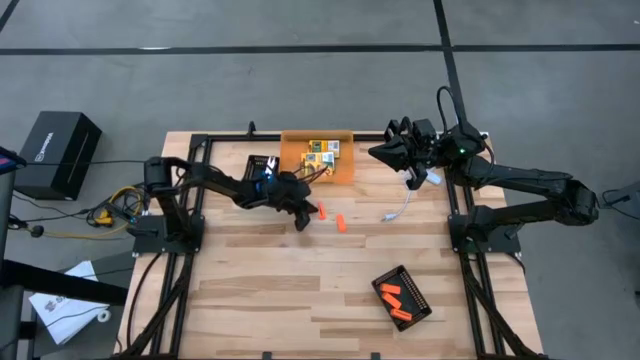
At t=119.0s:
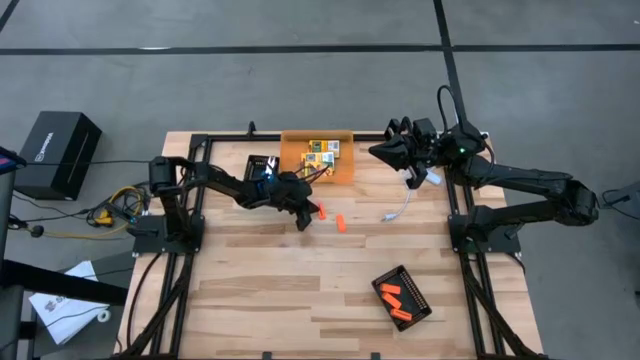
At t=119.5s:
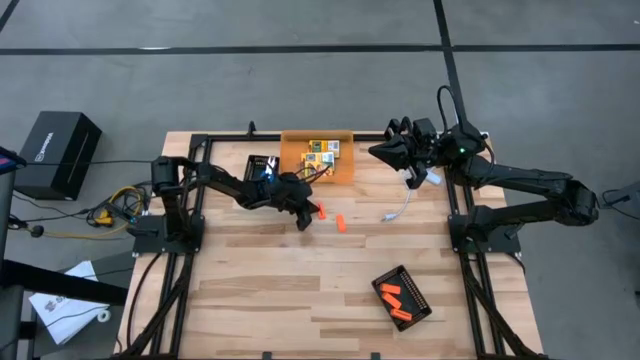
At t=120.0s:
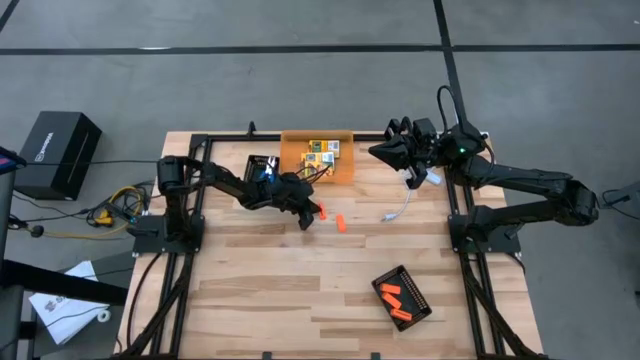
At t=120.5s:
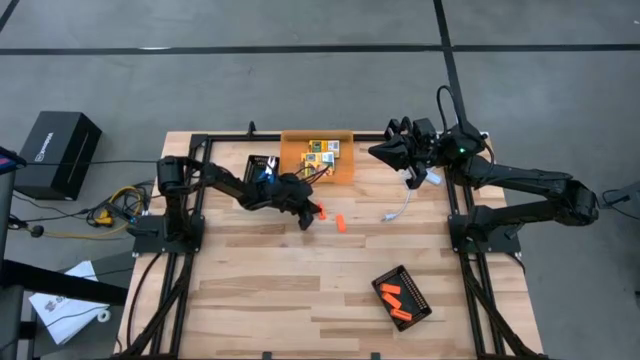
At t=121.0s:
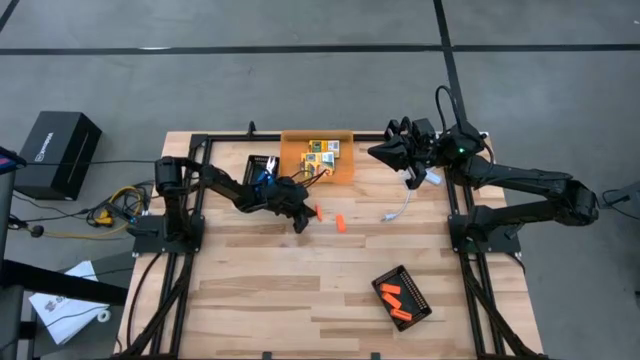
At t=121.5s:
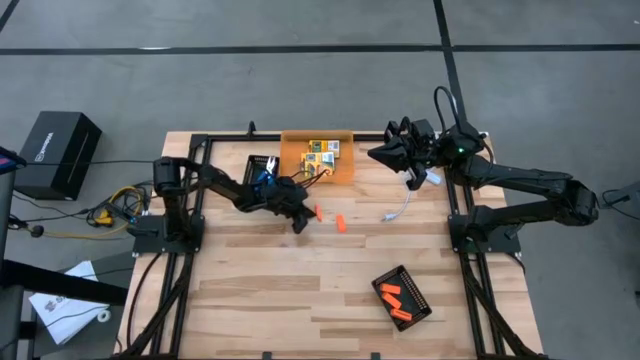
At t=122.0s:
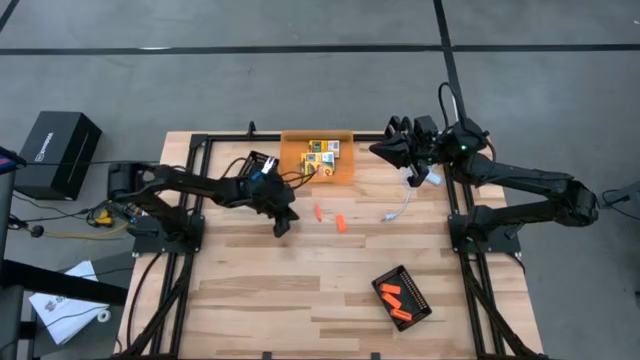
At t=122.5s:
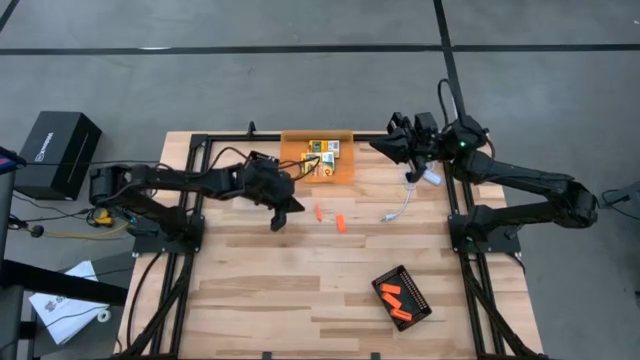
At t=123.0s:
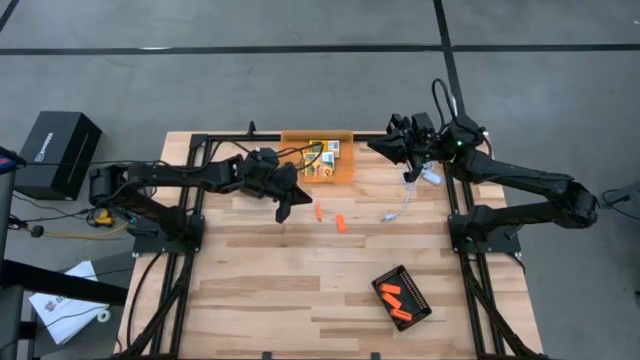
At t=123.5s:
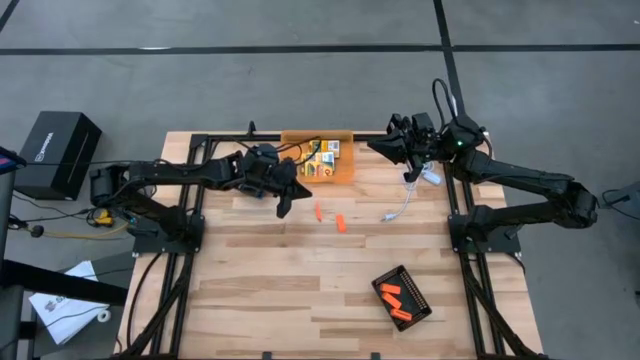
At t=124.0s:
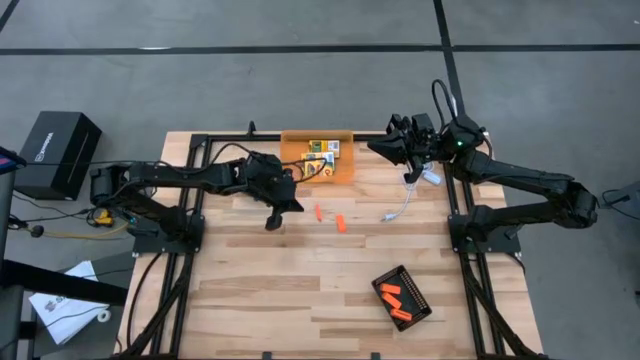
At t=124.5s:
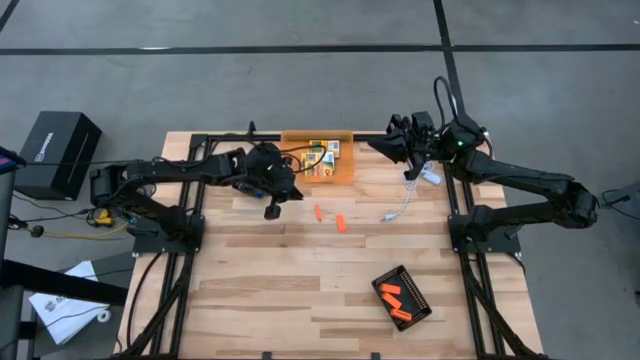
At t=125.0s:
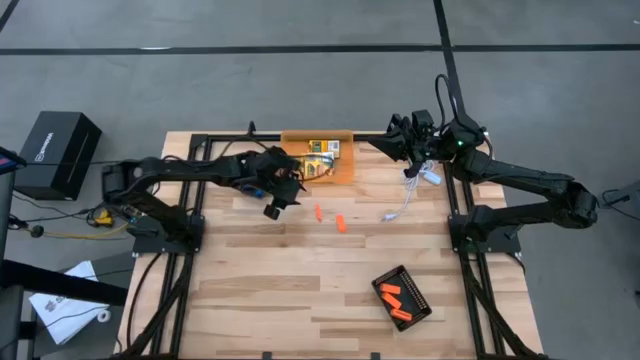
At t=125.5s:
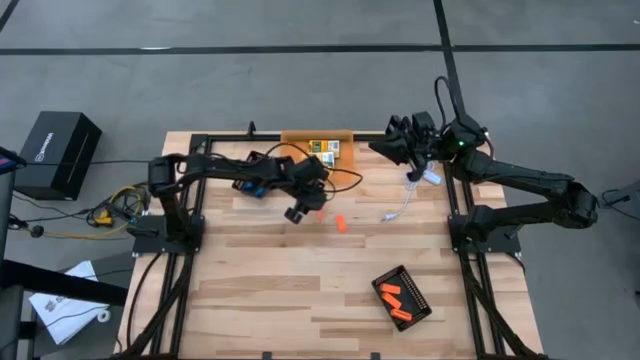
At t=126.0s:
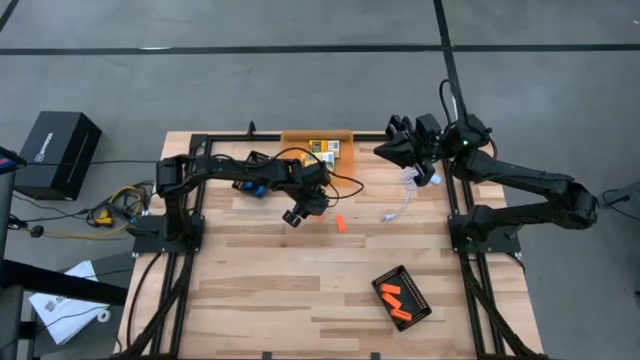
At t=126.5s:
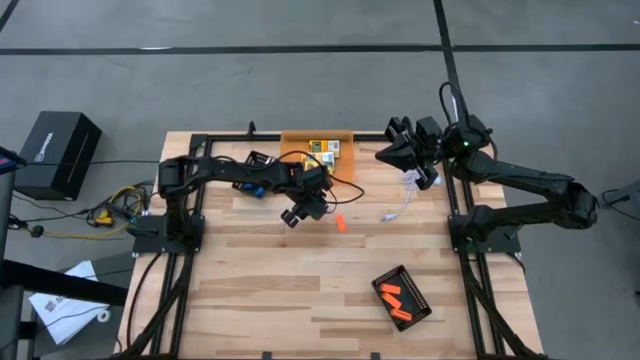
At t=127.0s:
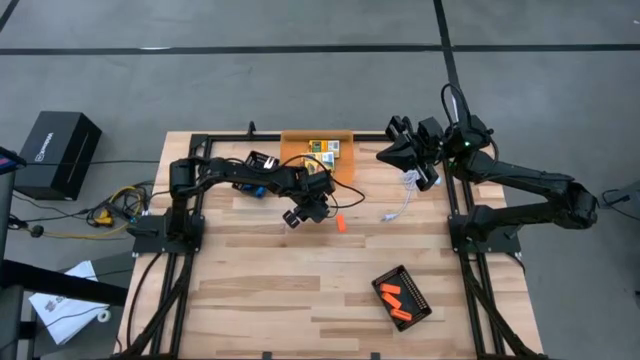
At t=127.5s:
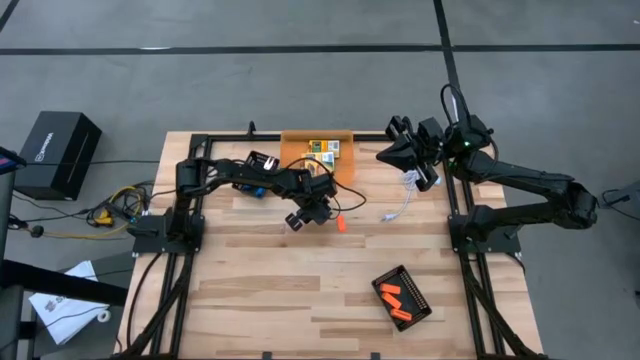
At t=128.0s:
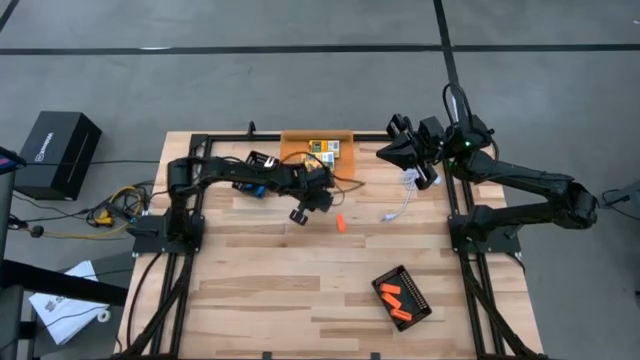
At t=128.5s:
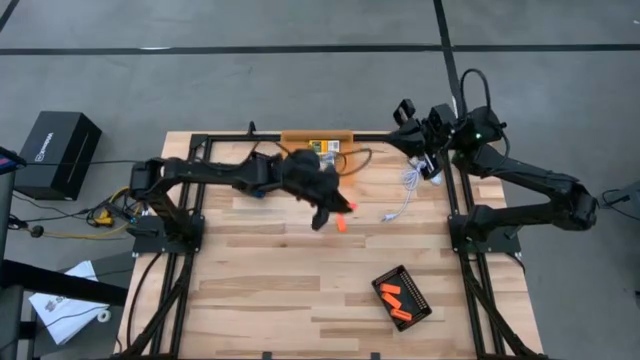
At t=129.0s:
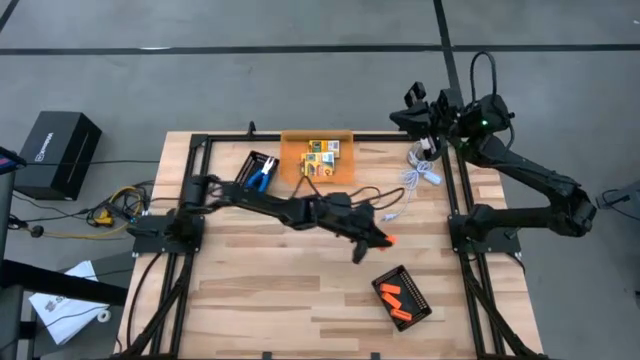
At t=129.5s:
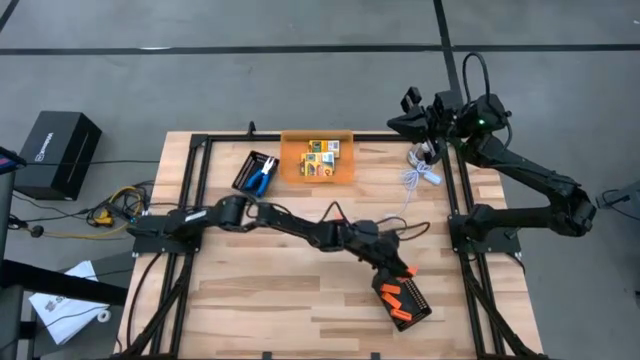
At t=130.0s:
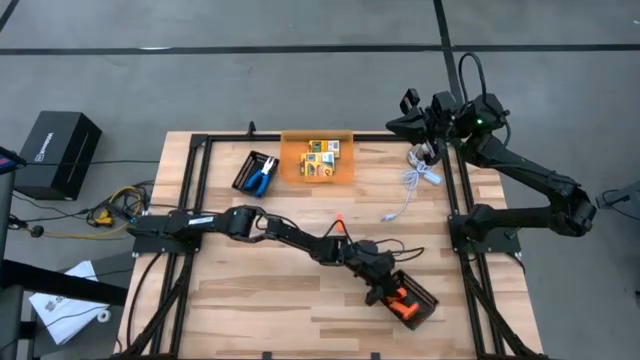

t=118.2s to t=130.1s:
Task: Pick & Place School Supplies
Put the orange eraser into the bottom black bin

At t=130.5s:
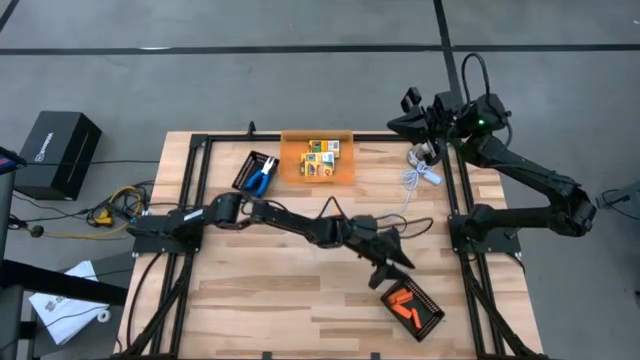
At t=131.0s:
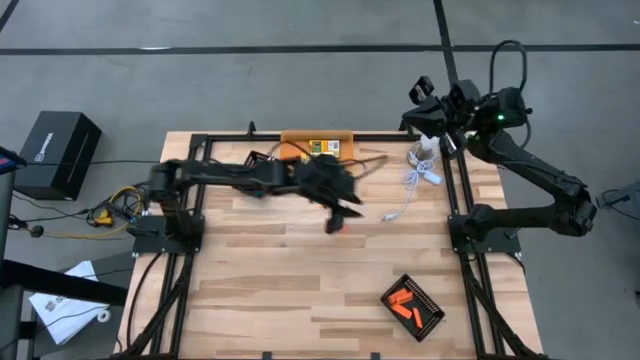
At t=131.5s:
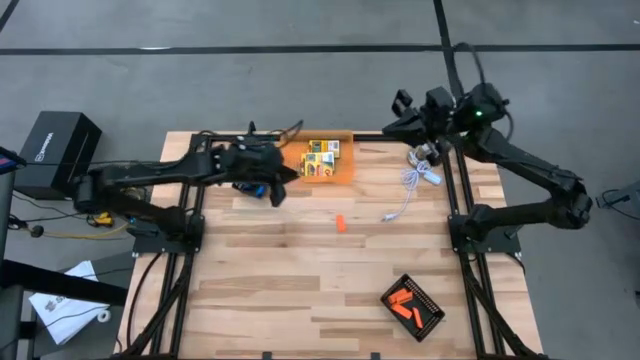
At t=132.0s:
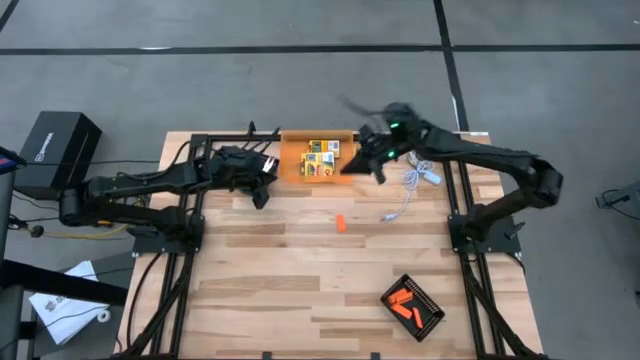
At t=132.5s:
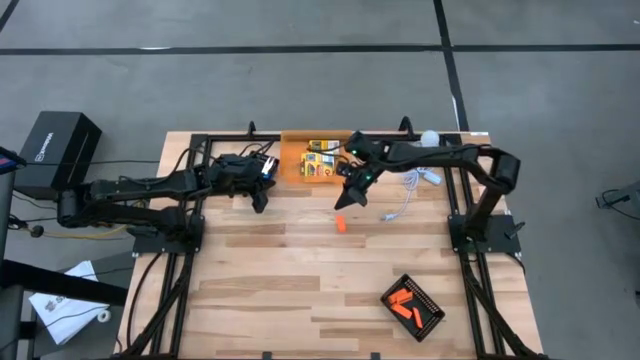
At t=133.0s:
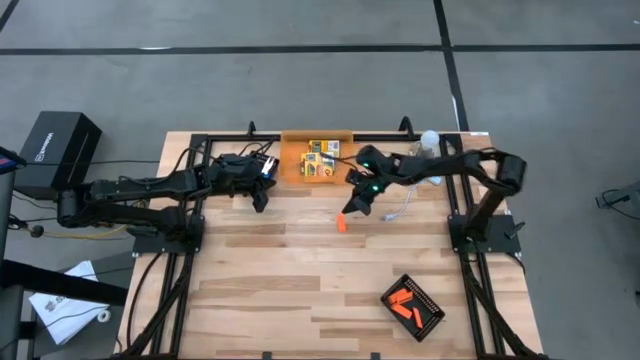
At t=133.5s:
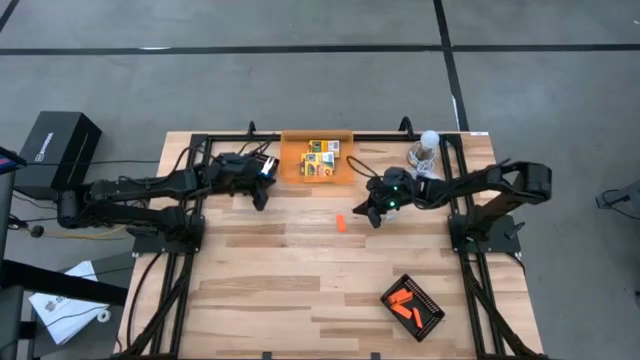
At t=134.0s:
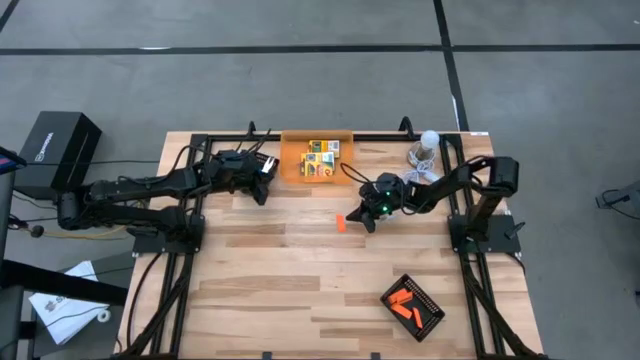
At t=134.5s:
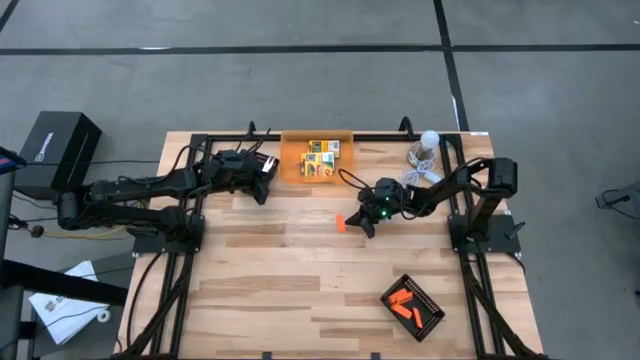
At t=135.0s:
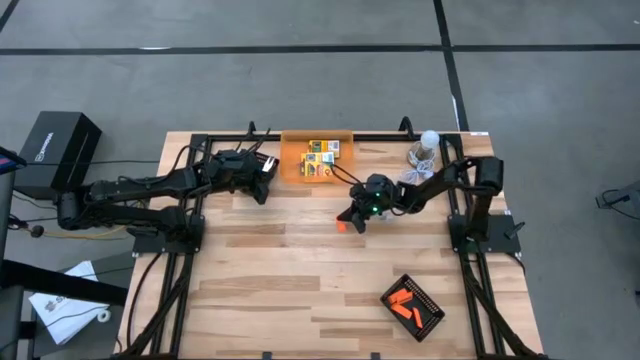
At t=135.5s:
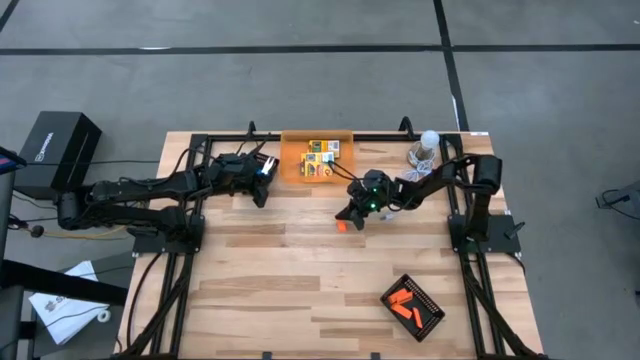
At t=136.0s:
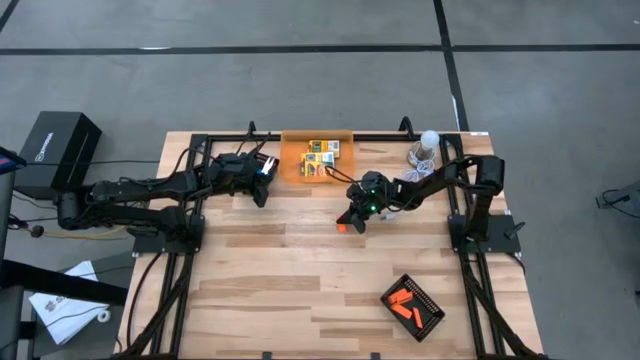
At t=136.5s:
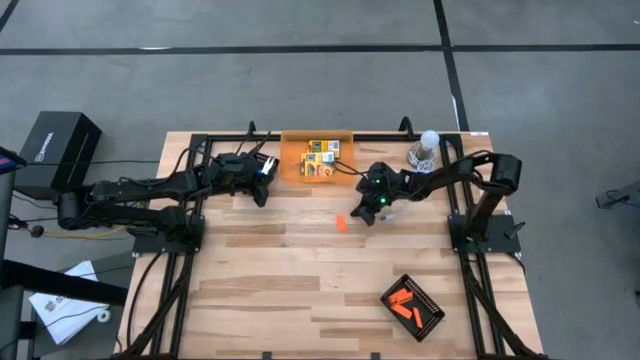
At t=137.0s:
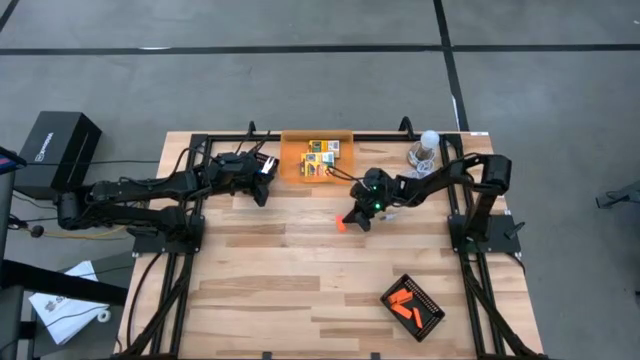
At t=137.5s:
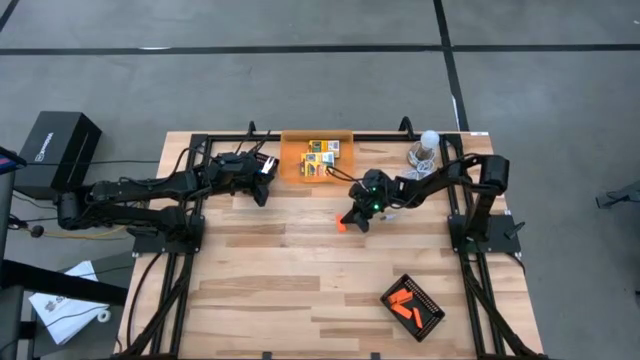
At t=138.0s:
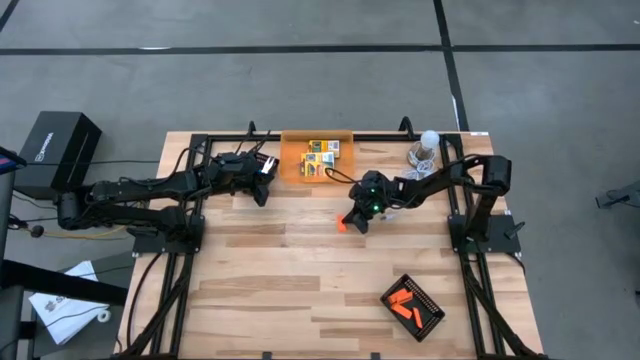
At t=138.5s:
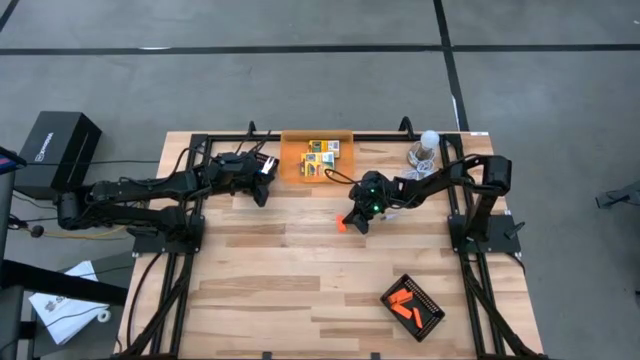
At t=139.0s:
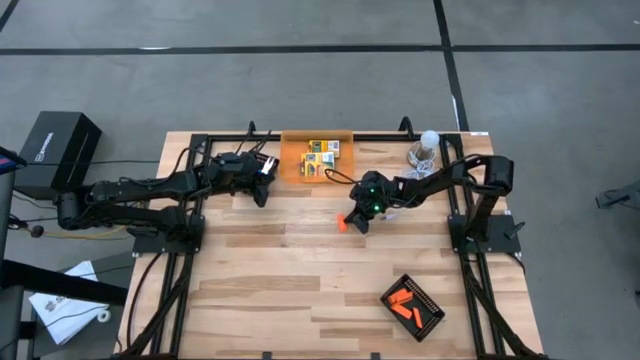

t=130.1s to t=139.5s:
Put the orange eraser into the bottom black bin
